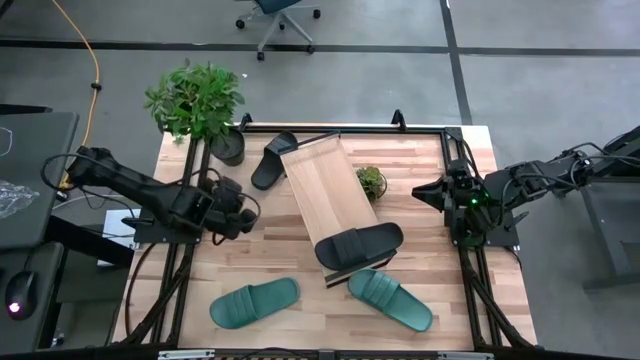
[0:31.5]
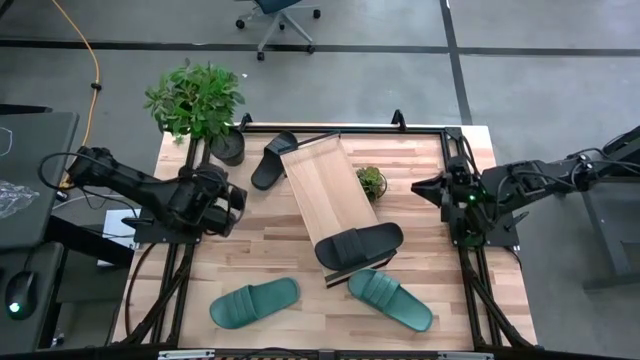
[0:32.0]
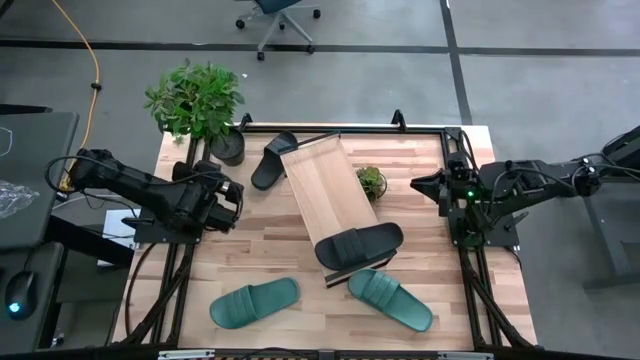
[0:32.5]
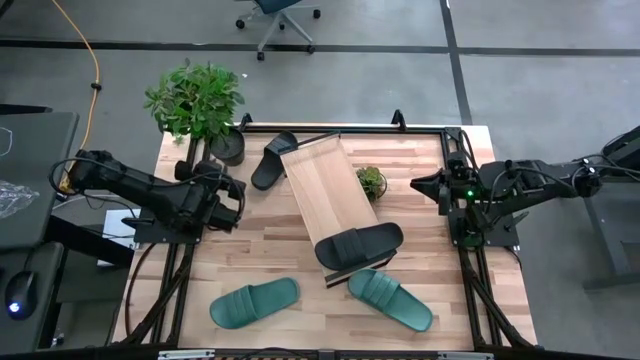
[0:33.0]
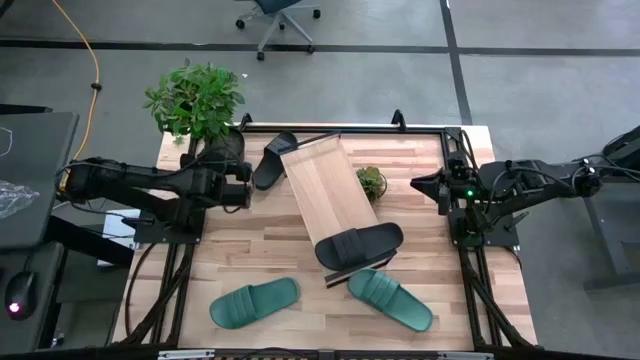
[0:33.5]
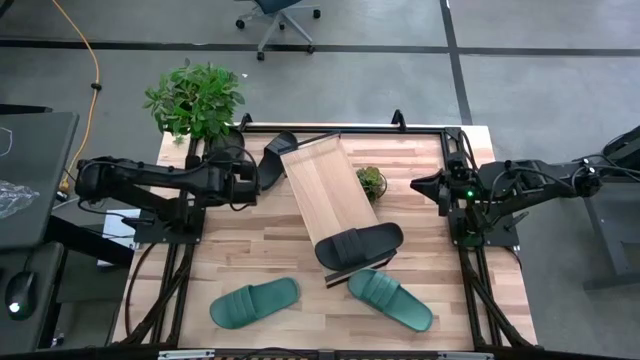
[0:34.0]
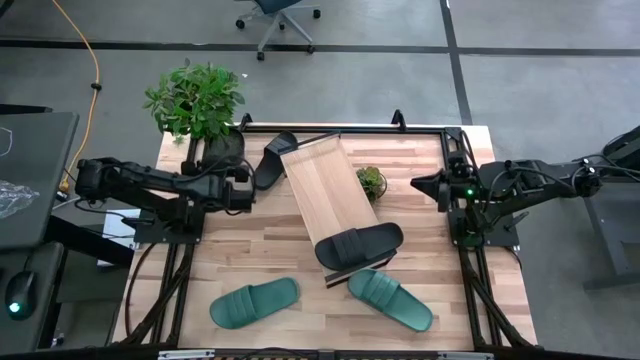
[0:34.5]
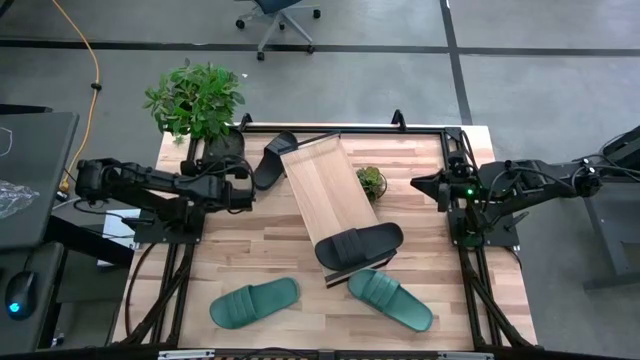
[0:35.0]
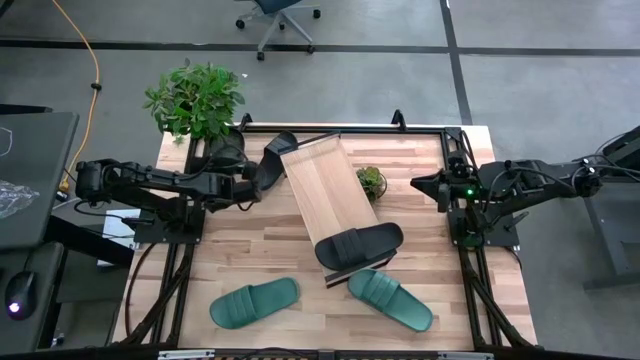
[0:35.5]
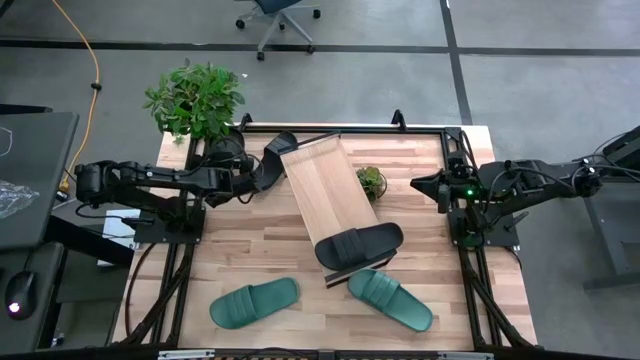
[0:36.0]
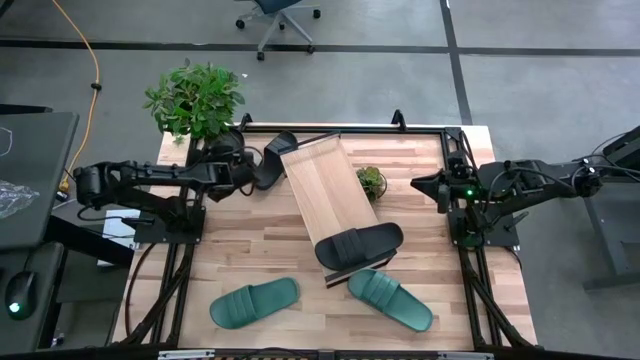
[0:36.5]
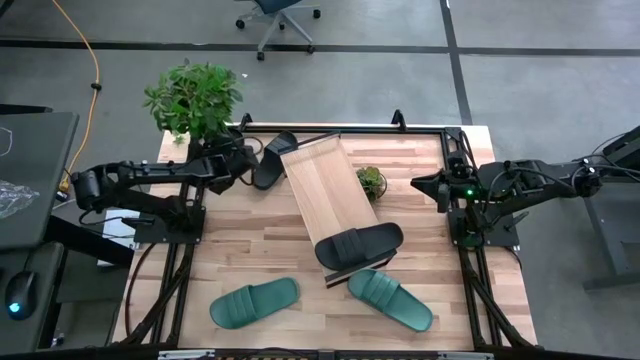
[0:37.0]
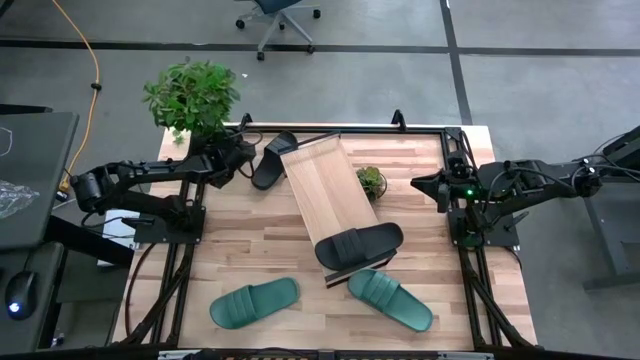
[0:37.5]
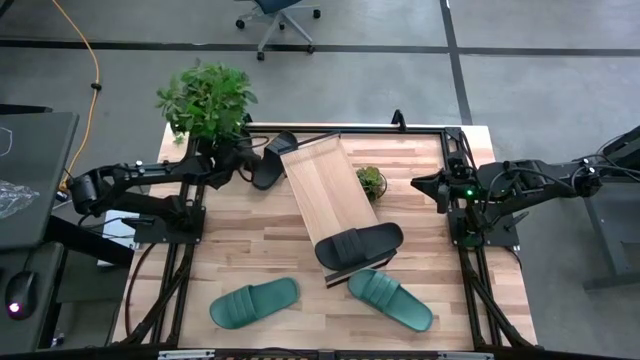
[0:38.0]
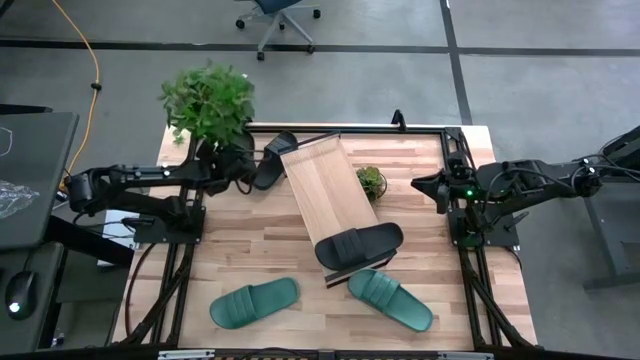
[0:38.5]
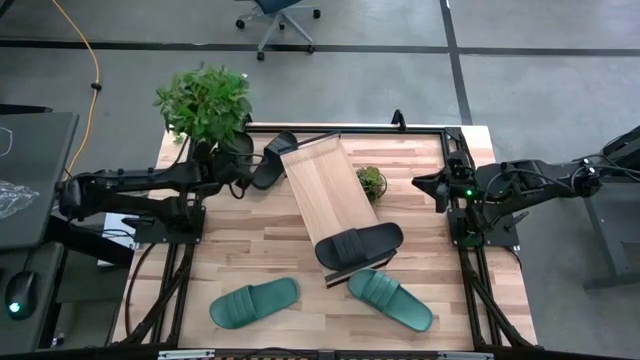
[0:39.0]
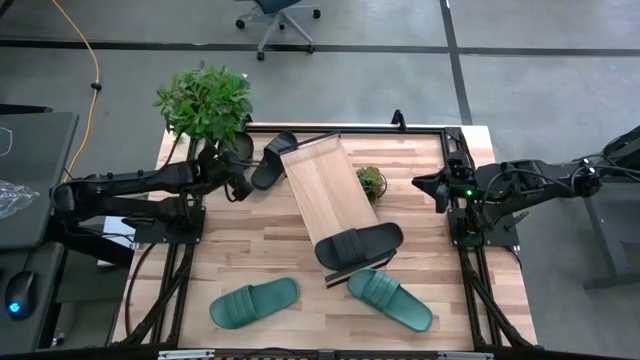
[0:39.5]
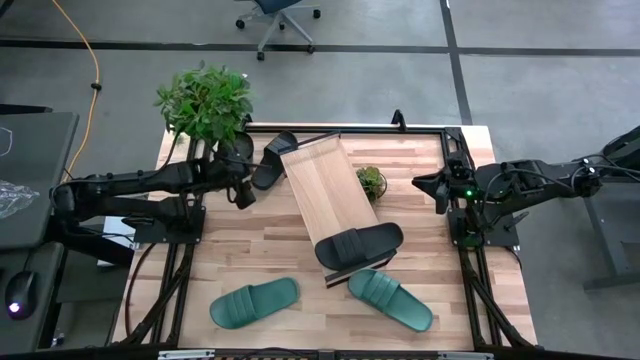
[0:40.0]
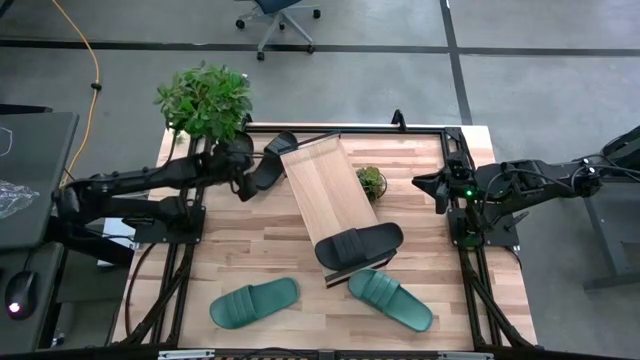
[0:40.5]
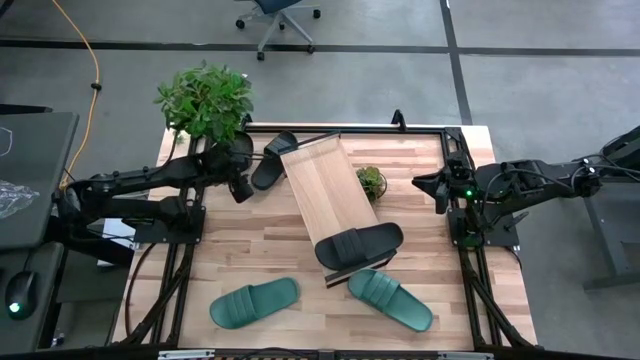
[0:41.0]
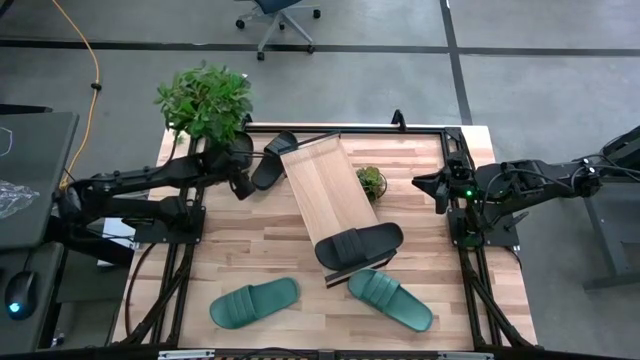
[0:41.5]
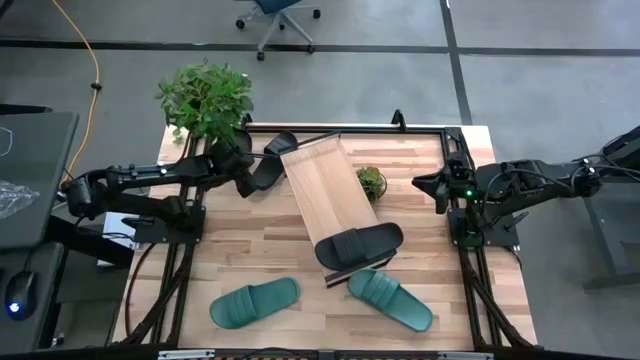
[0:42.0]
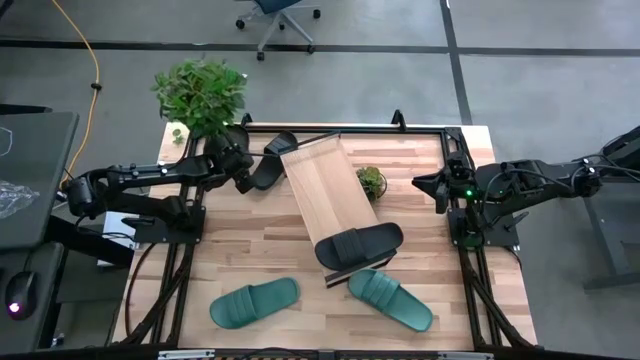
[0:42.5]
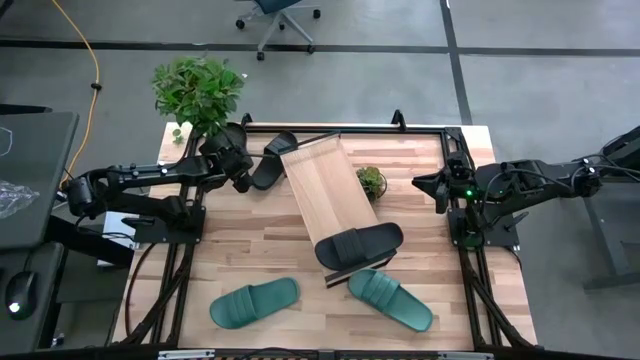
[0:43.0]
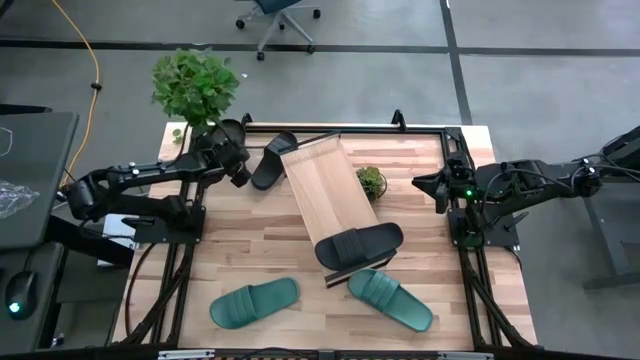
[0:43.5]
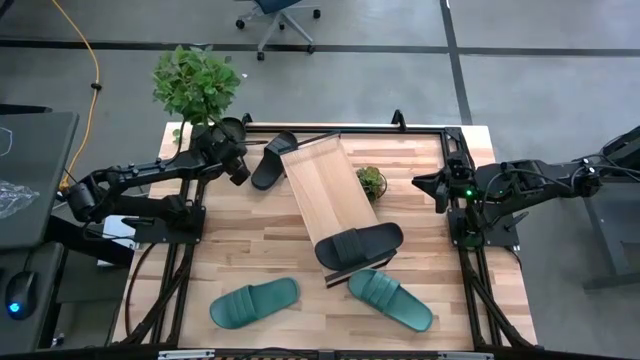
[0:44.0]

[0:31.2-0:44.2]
Task: Pick and place slides into the shelf
Adjust the black vase plant

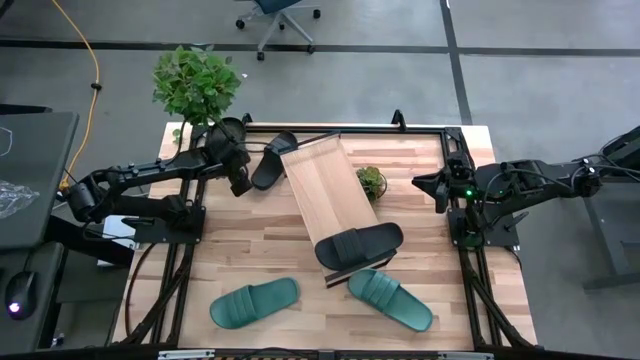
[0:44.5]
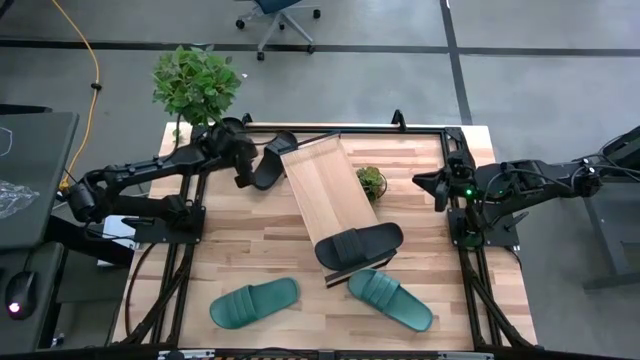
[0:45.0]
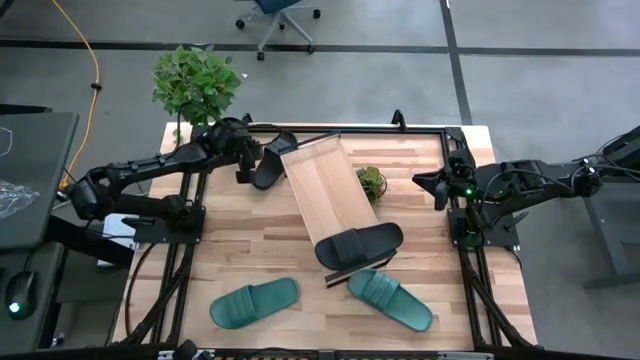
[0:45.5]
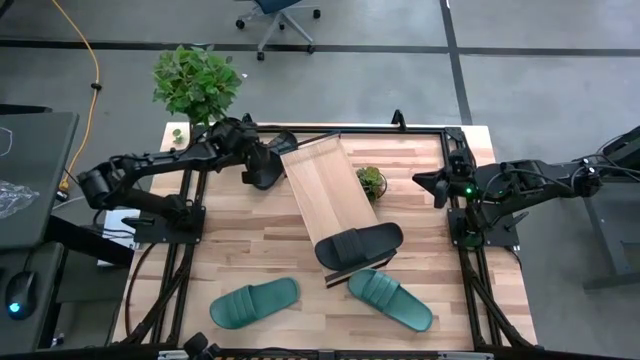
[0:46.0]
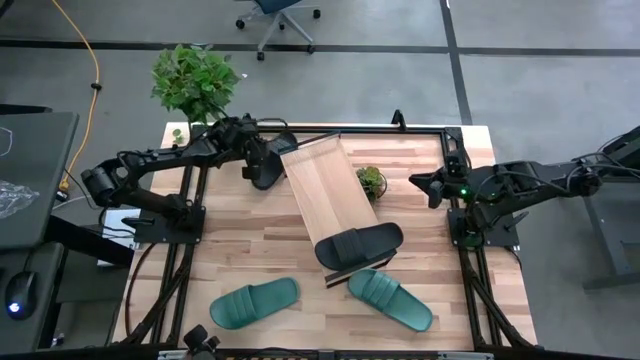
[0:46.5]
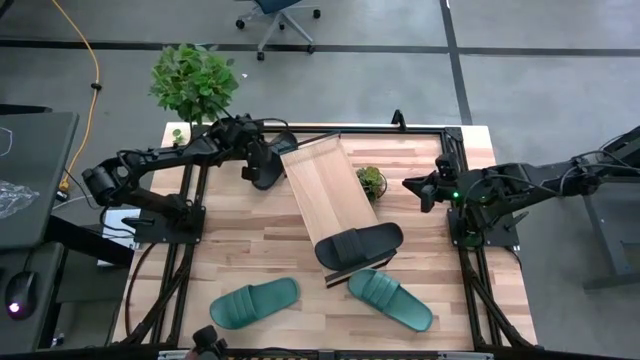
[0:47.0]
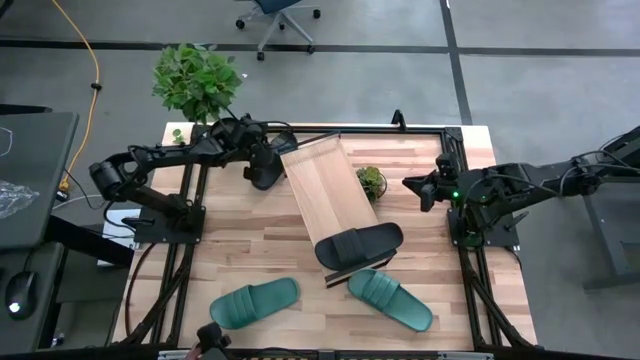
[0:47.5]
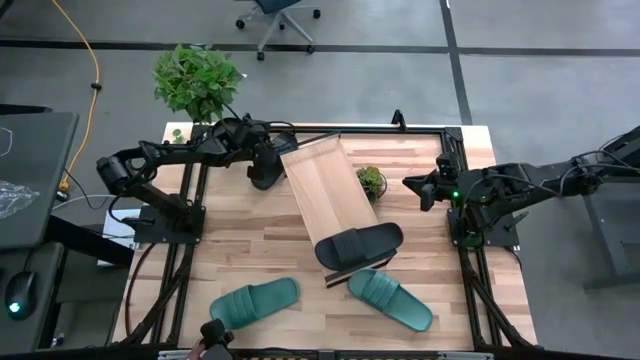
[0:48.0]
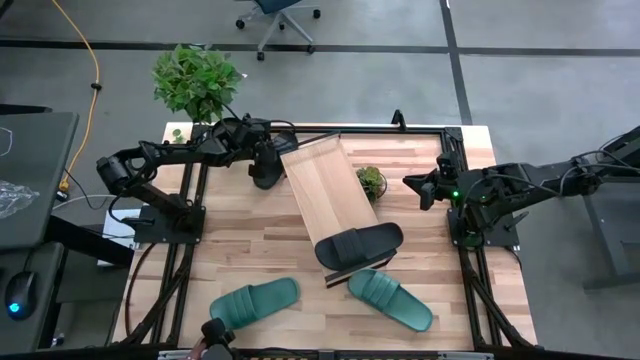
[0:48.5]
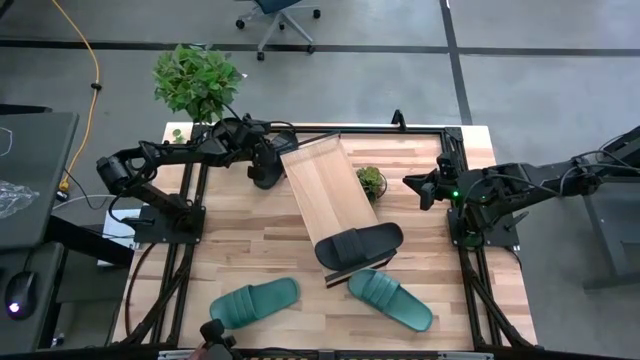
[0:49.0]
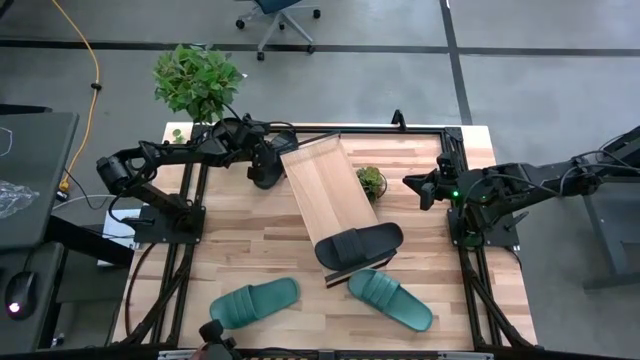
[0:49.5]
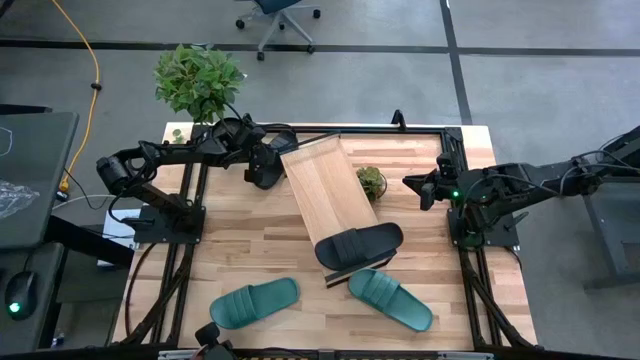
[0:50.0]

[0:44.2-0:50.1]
Put the black slipper on the shelf
